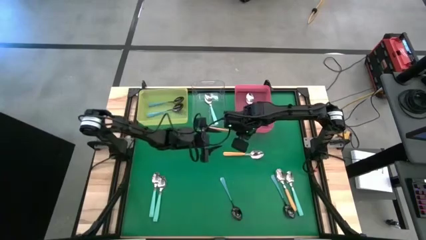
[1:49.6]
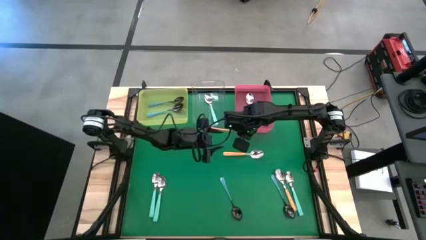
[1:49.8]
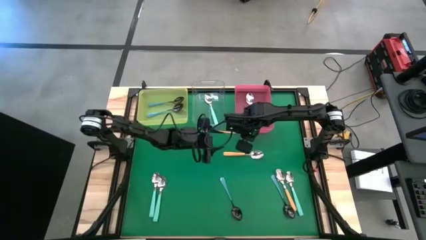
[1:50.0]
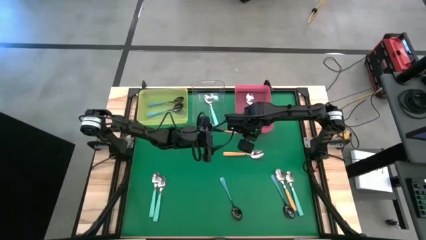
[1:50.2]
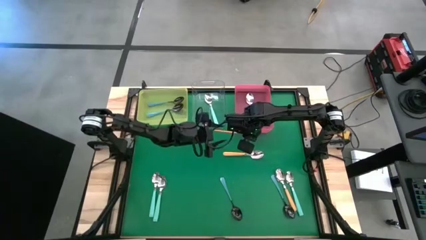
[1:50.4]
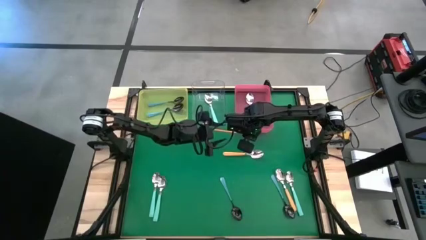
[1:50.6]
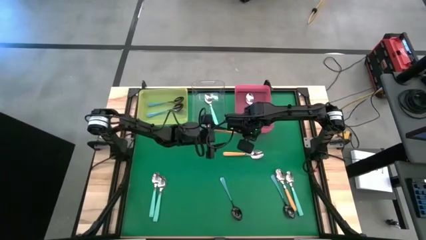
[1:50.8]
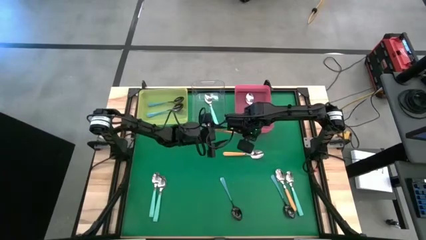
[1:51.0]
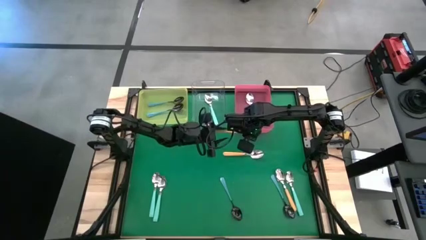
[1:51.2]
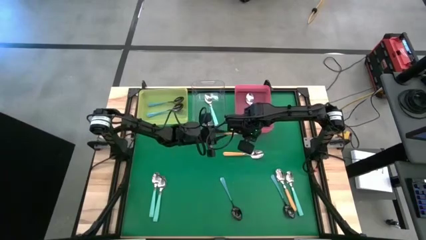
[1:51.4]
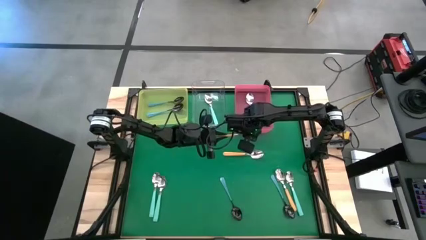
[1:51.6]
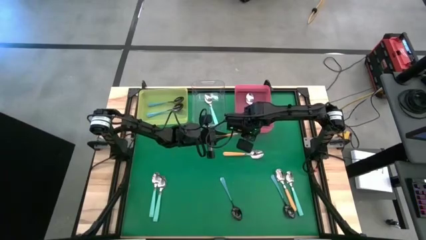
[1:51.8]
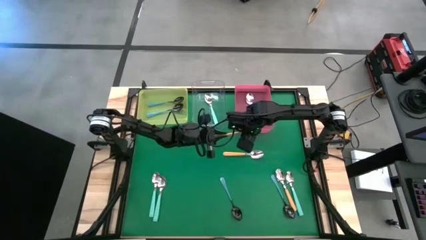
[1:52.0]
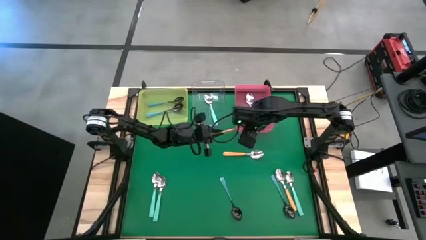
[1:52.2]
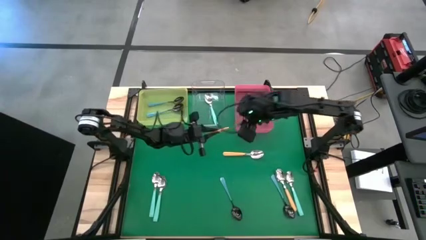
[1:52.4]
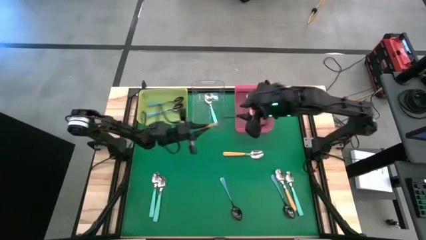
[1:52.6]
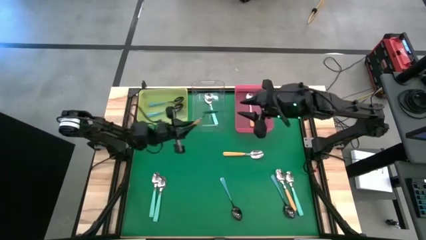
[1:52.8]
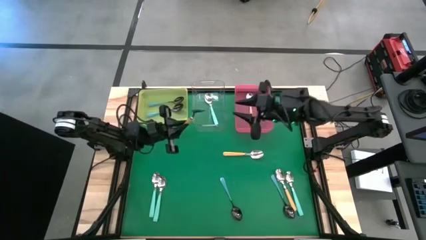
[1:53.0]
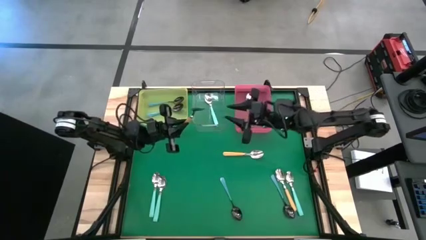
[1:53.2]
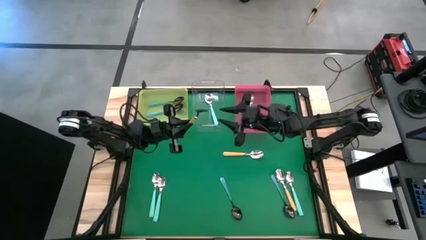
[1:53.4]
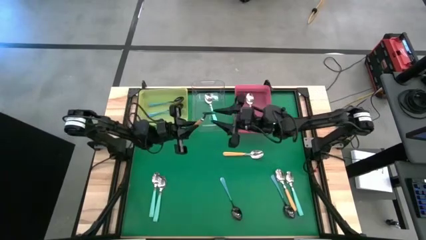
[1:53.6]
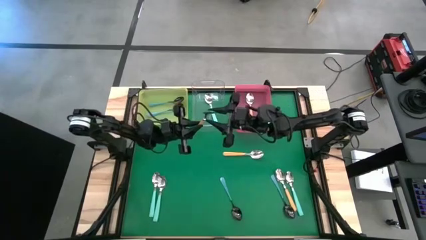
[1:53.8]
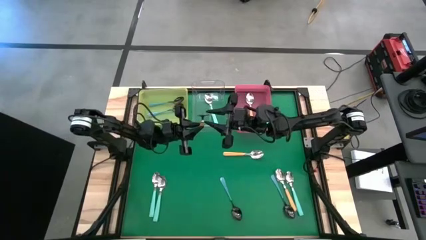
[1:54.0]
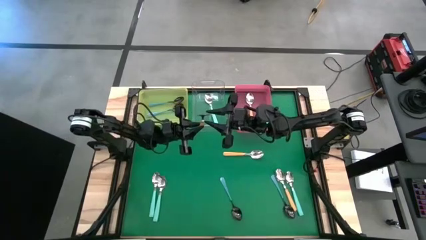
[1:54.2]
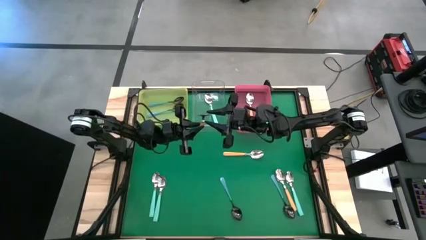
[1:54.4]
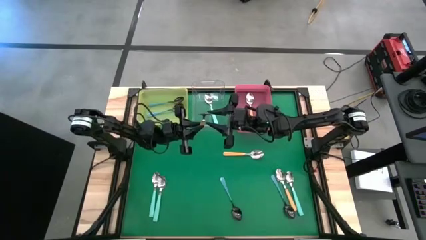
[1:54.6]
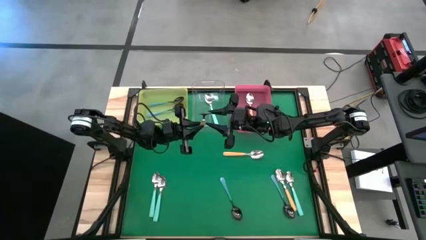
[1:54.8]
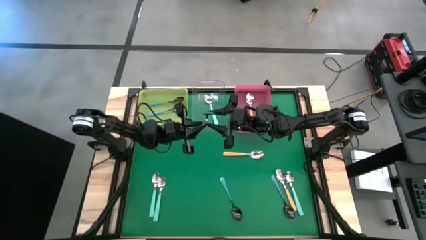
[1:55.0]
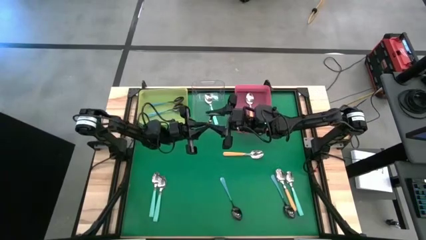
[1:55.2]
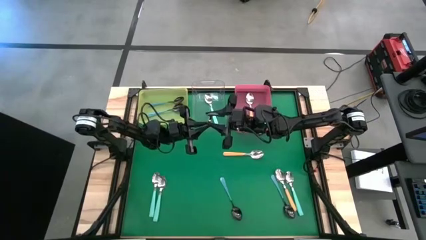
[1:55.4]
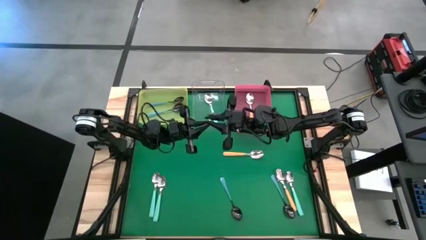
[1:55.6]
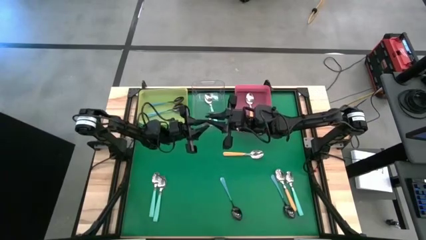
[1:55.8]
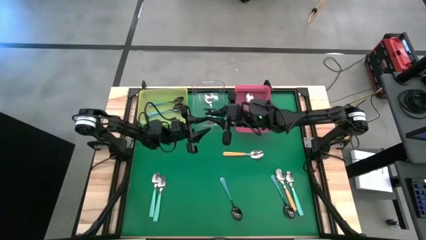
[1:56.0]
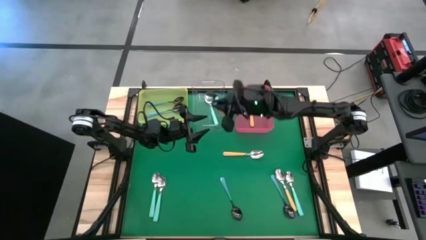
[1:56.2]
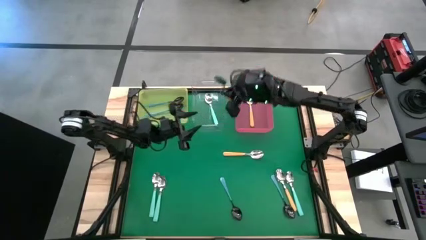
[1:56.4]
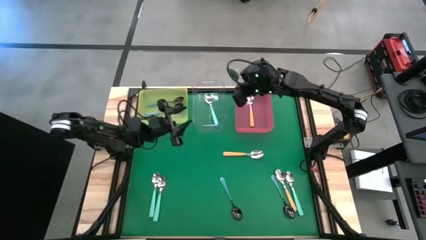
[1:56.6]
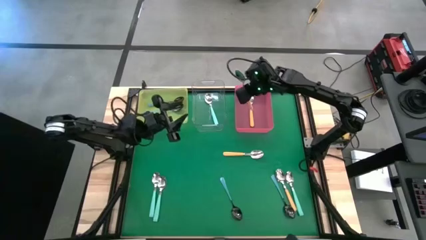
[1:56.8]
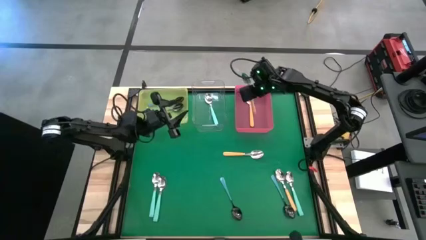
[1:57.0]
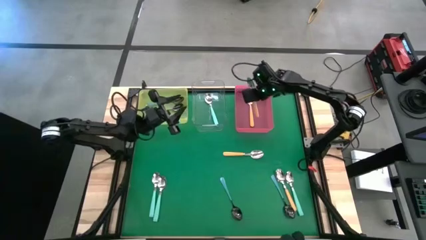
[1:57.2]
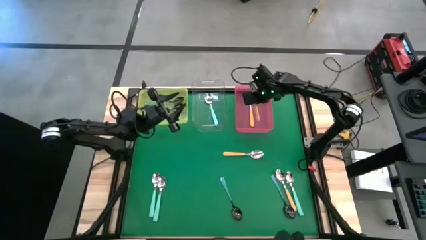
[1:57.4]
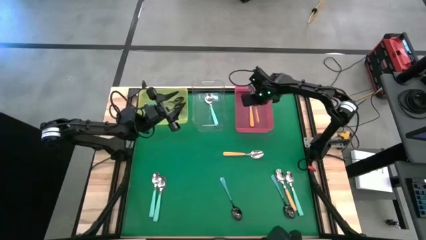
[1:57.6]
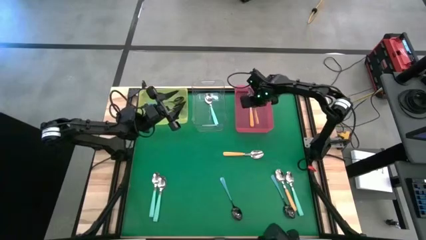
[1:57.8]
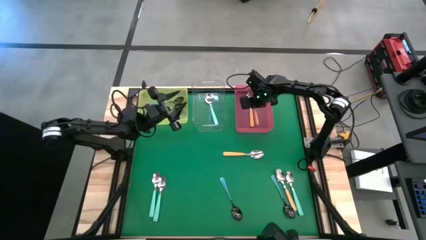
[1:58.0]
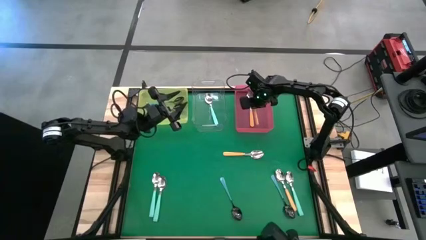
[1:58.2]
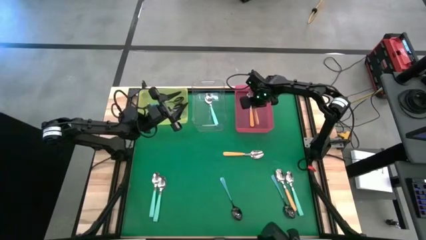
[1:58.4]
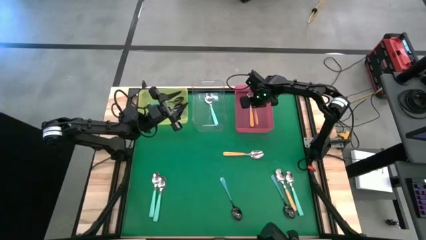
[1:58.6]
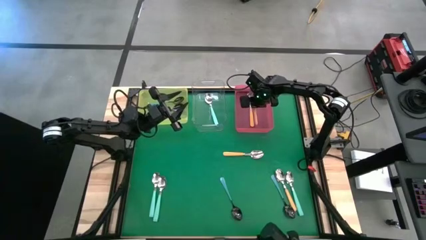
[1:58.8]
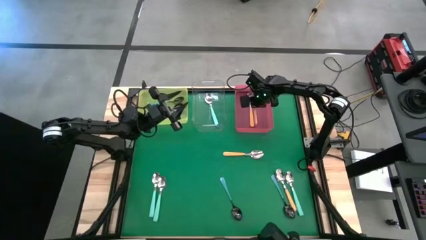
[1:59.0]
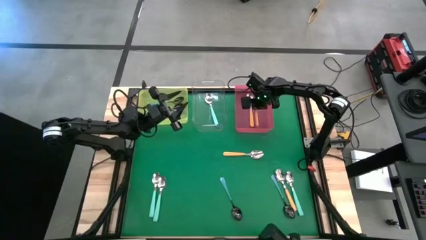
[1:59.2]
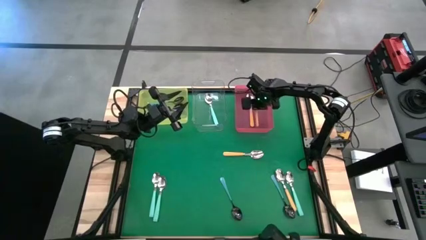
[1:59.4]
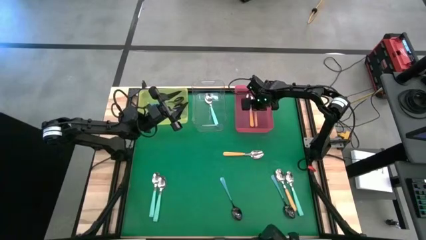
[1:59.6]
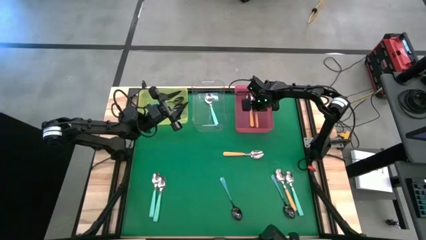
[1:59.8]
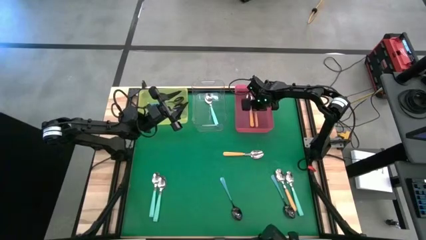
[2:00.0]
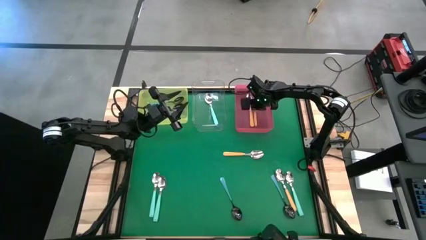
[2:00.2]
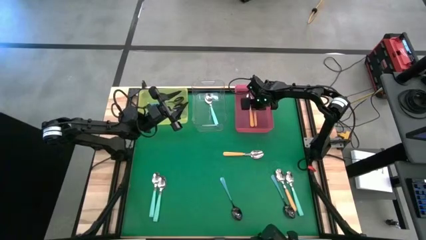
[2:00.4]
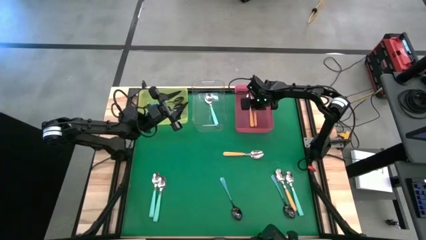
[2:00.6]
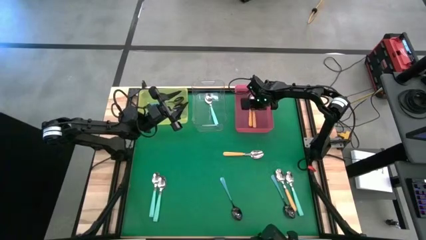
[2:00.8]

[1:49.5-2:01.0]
Task: Sort silverware by color (type)
Put the yellow spoon into the red bin
